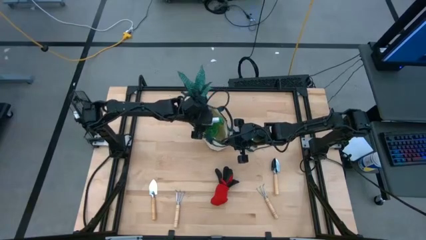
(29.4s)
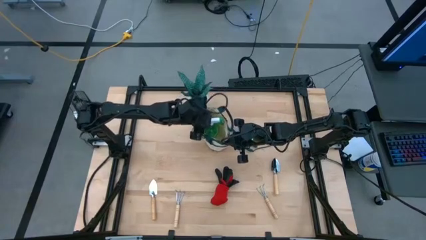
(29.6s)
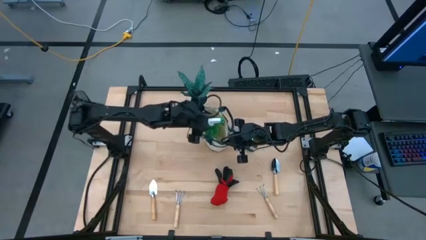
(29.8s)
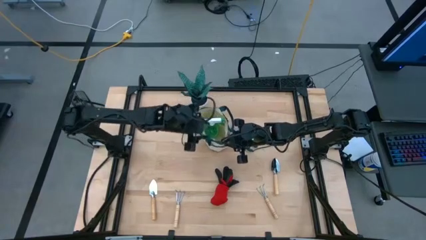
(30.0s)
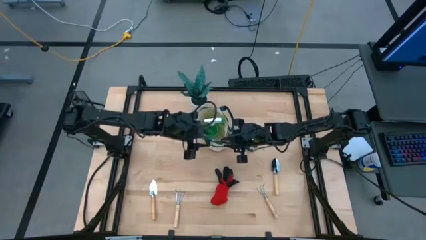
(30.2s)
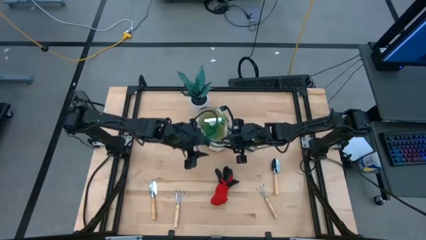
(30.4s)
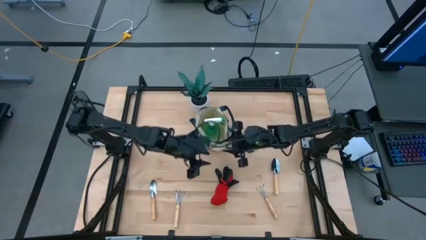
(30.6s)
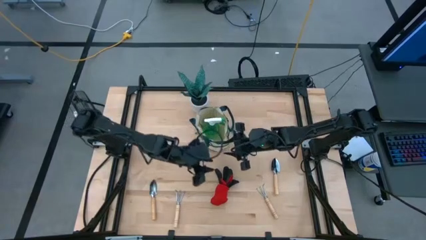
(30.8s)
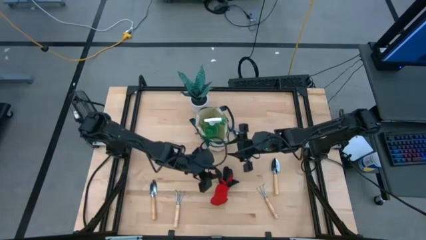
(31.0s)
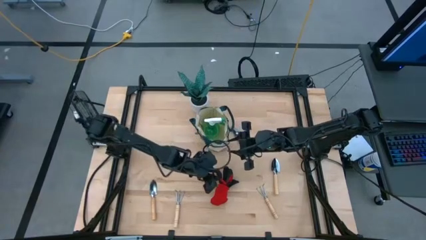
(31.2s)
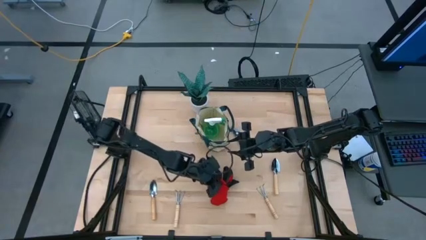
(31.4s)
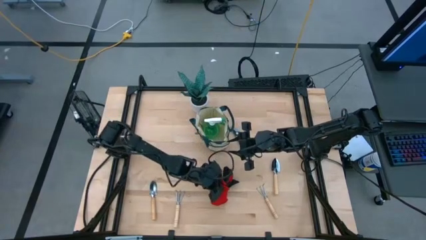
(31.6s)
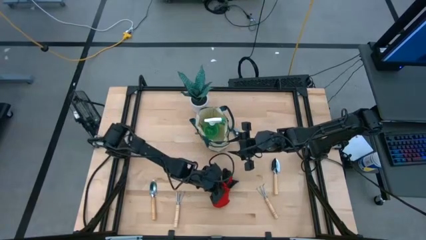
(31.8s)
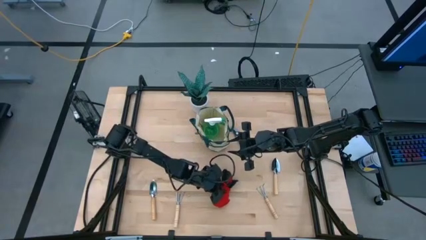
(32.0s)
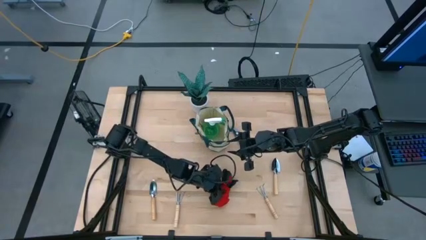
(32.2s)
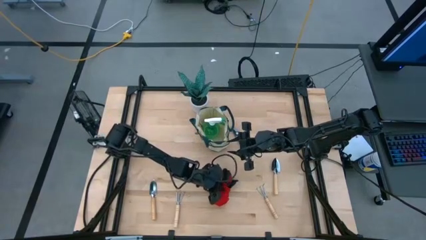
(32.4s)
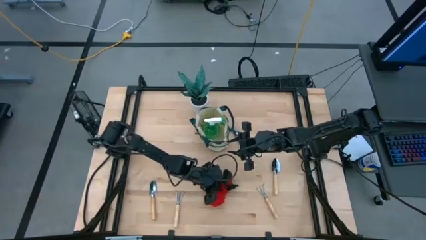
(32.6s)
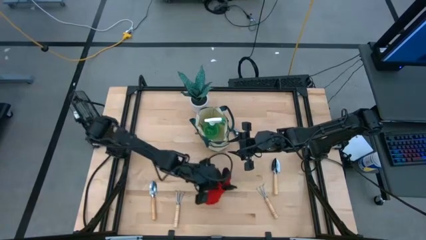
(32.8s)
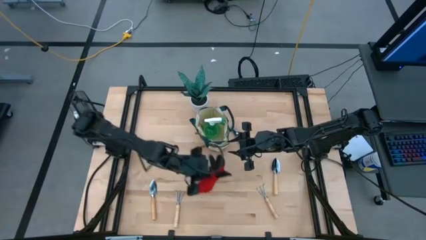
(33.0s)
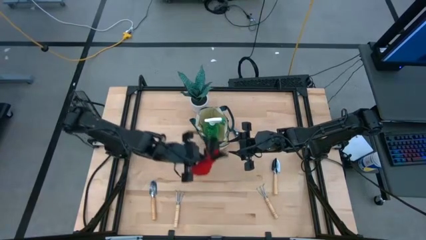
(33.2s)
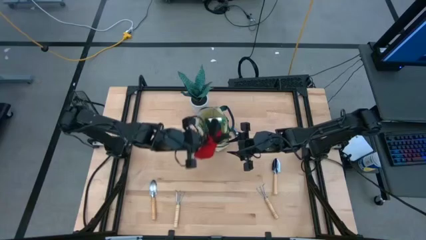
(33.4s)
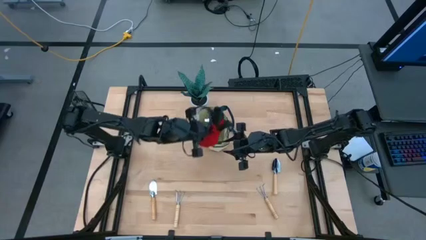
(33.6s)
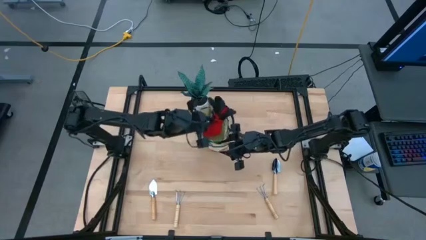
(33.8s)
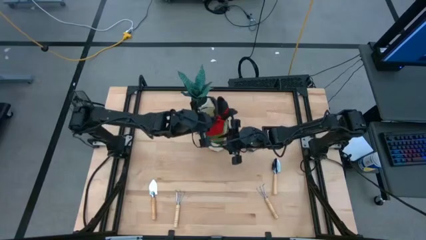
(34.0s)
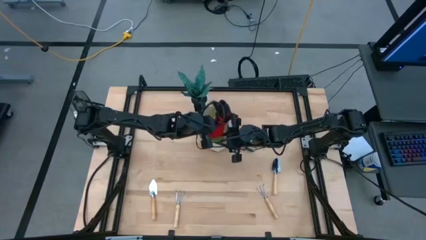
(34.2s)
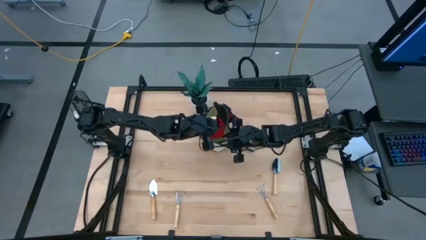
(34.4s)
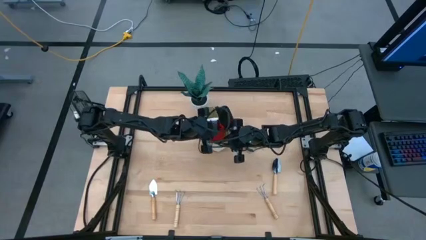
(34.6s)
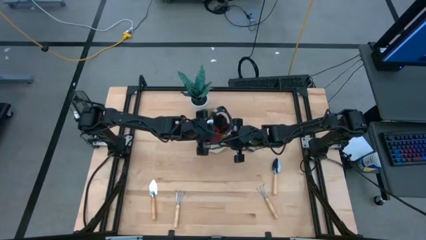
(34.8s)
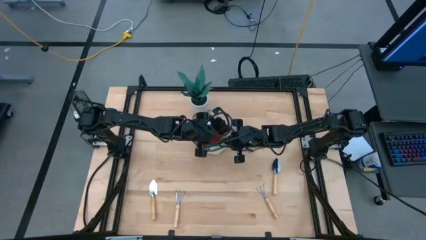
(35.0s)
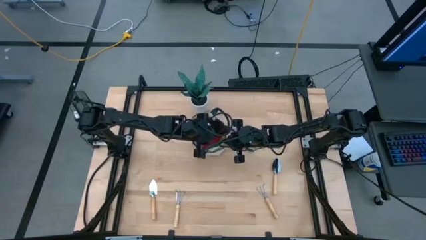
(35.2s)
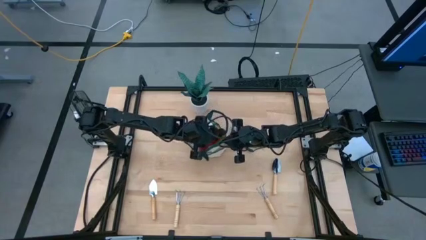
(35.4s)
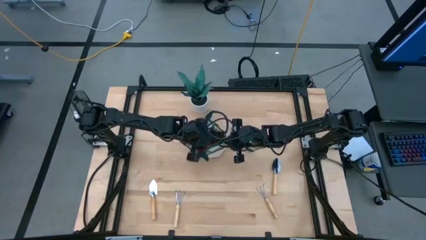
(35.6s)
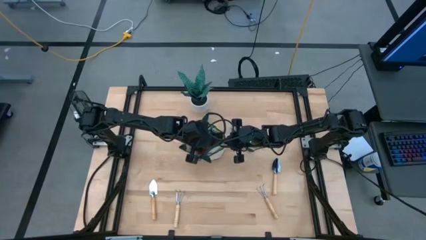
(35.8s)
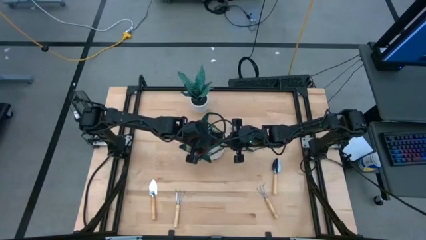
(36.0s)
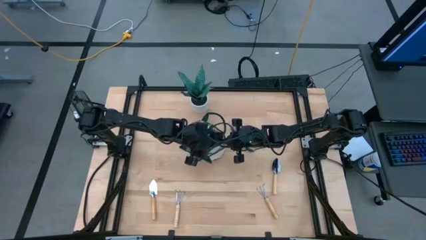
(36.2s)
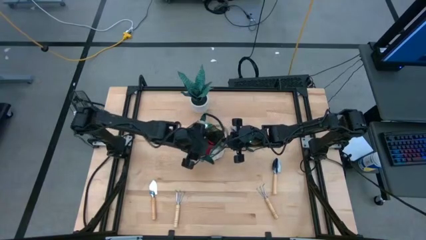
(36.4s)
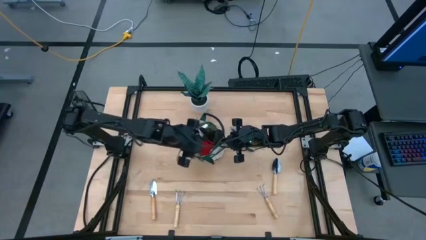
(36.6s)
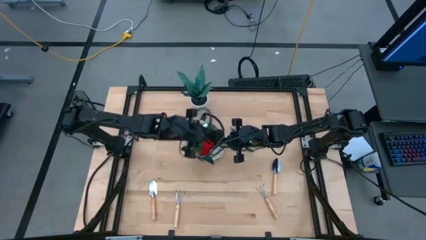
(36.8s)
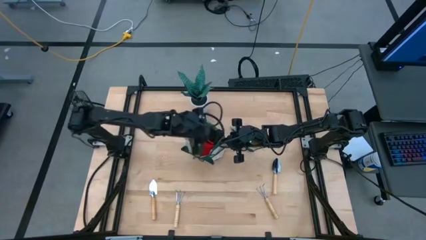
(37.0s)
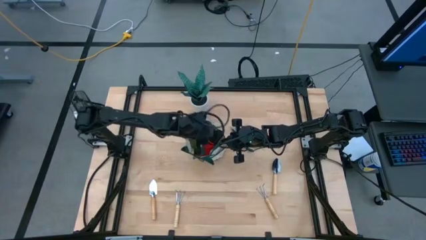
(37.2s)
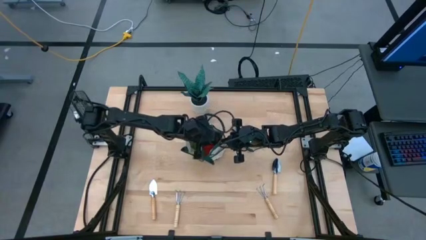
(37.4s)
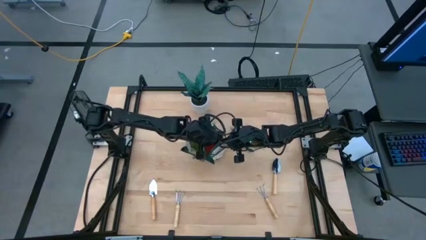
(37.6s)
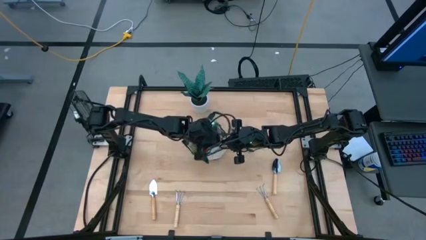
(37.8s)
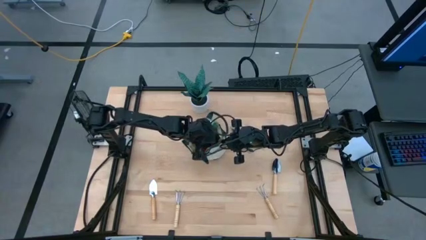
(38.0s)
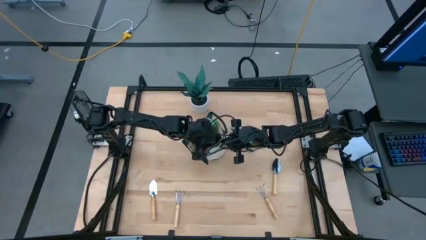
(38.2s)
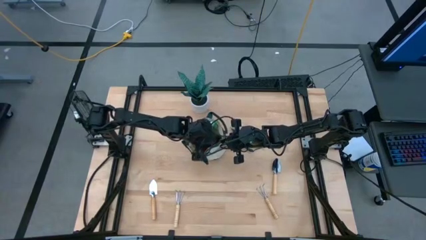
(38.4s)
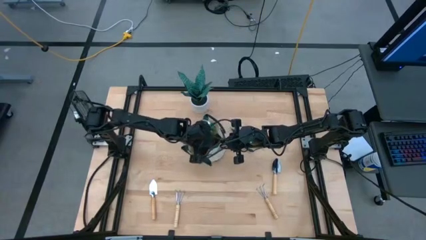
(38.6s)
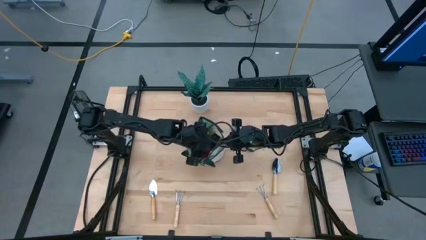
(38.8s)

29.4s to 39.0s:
Task: Pick & Place Garden tools in Gardening bag
Put the red gloves into the gardening bag

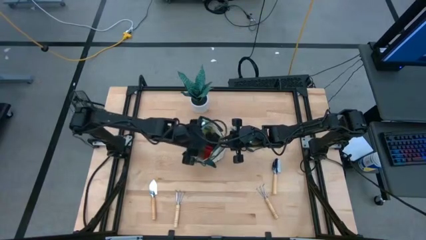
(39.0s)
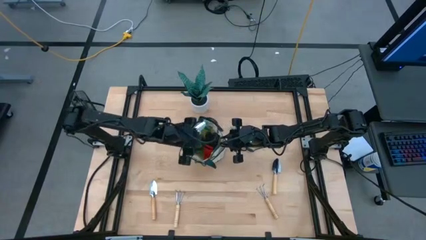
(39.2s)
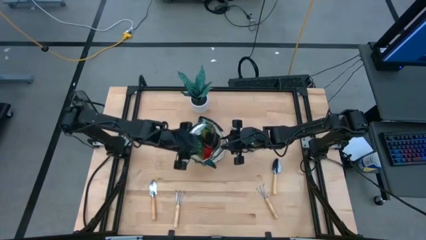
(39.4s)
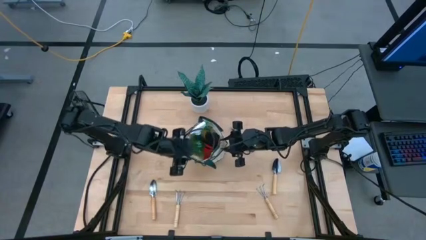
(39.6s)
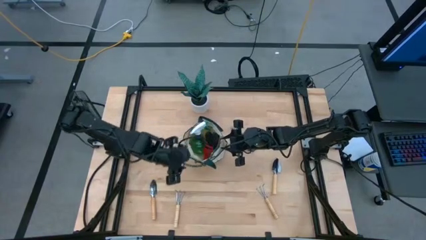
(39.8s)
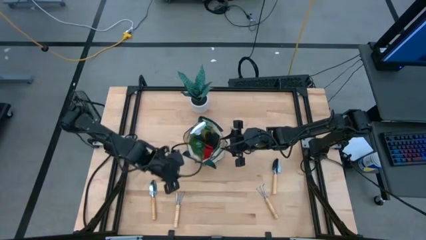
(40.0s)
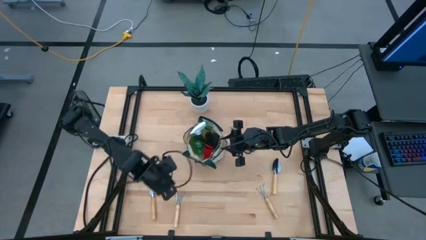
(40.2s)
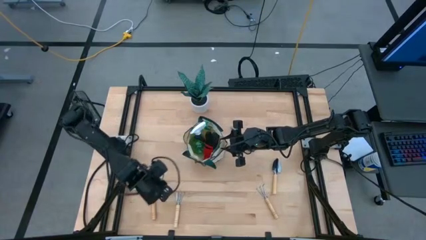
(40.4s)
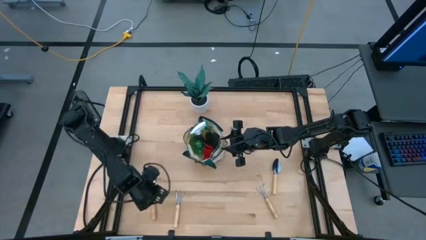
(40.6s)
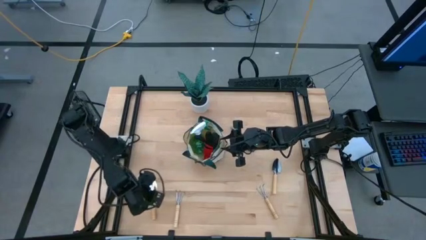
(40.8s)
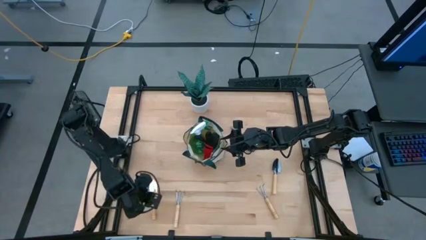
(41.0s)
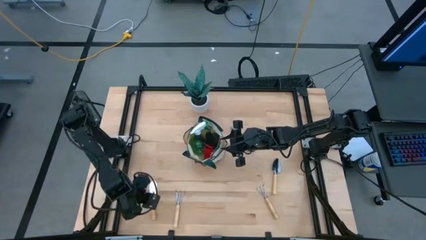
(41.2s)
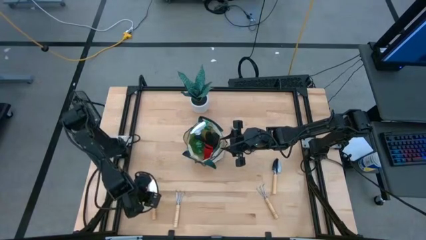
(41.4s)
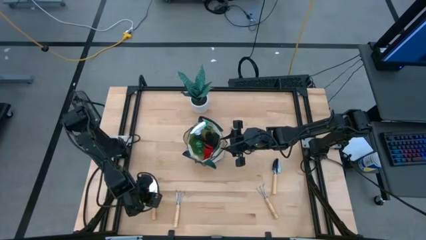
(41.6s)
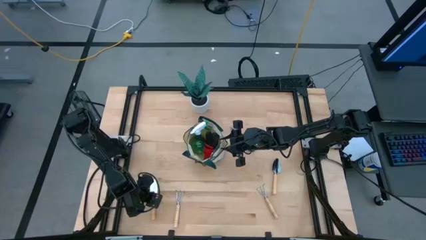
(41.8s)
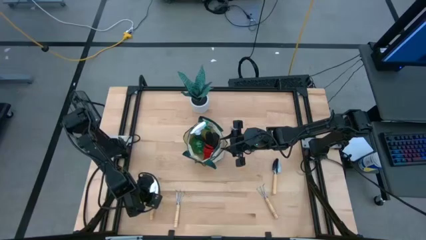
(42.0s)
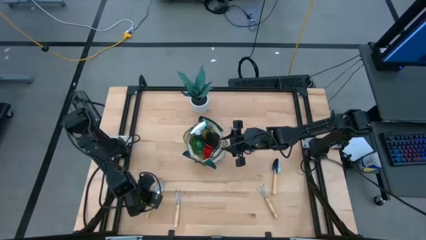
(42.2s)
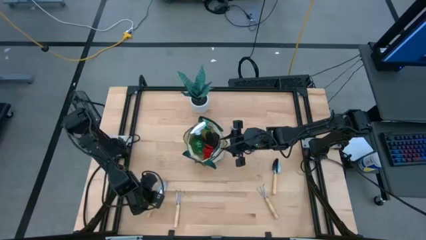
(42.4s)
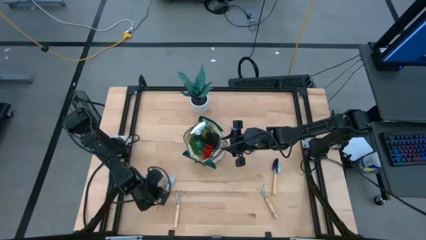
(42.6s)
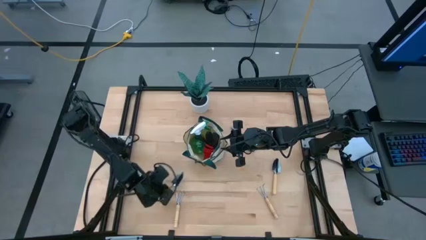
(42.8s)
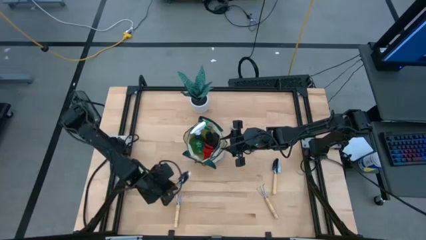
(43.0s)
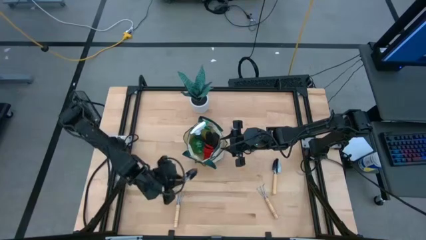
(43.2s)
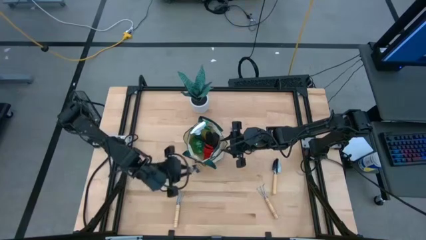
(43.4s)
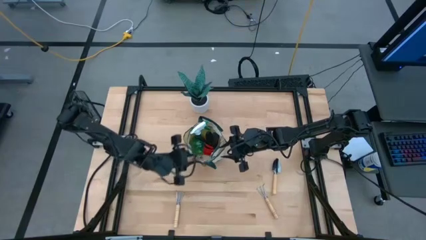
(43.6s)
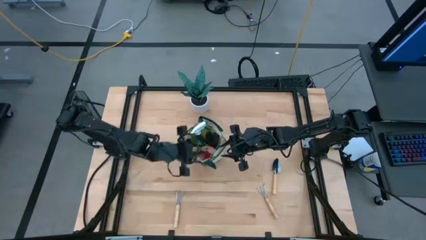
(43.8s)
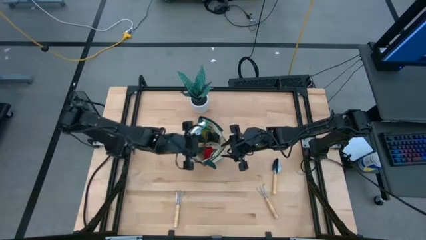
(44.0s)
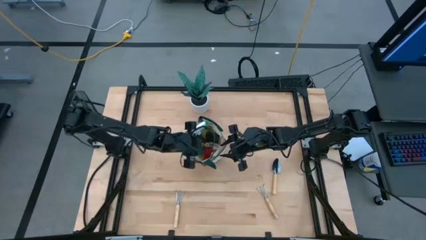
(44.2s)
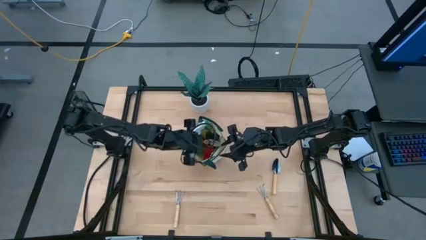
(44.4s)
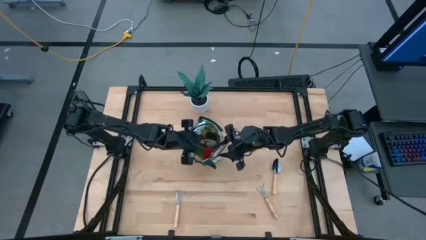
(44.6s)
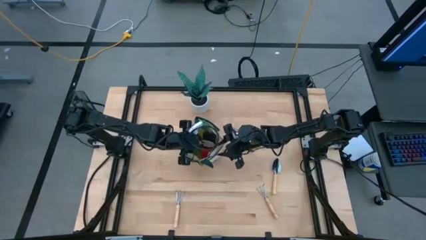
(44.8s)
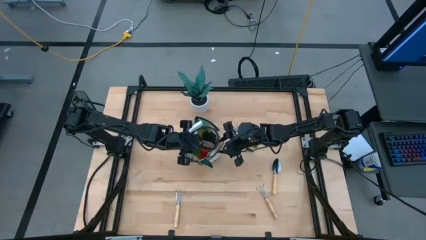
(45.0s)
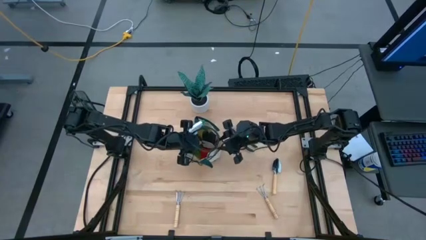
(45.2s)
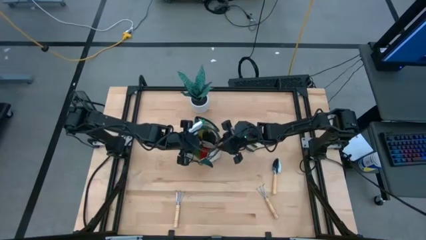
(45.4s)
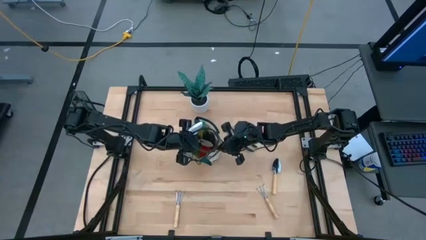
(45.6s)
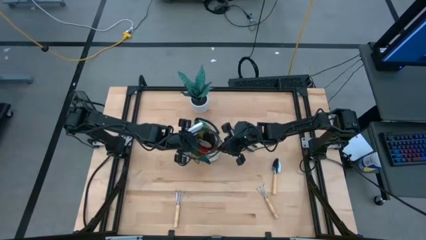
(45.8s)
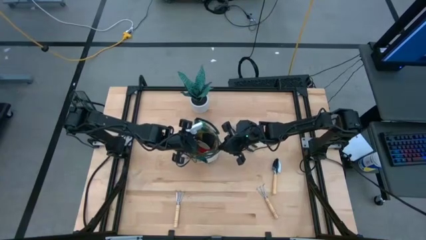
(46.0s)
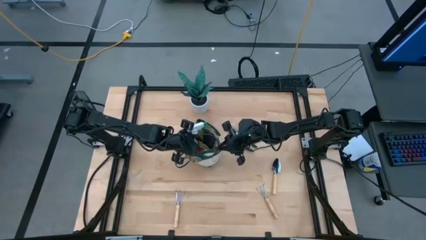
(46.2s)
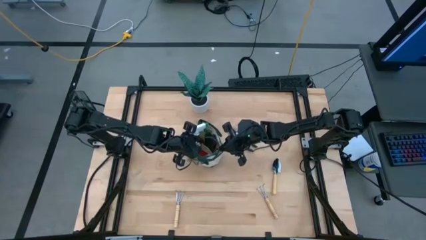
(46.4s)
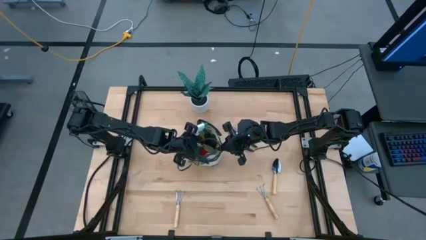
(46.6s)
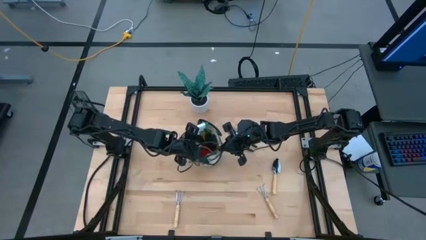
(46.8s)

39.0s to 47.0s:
Put the left brown trowel into the gardening bag
